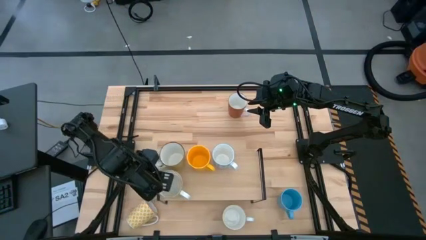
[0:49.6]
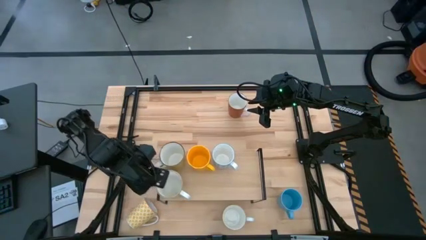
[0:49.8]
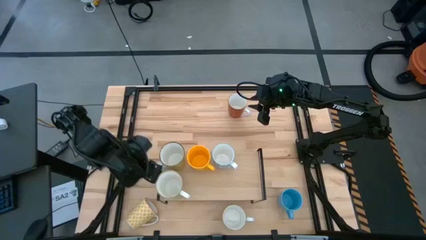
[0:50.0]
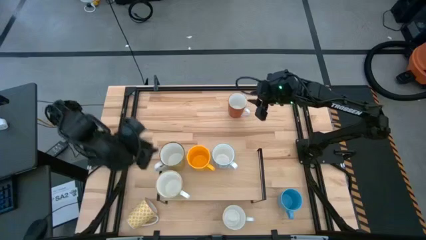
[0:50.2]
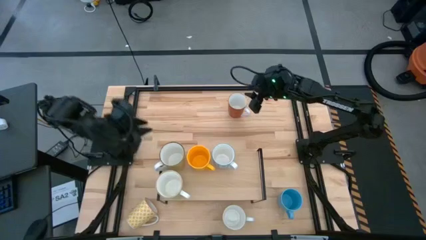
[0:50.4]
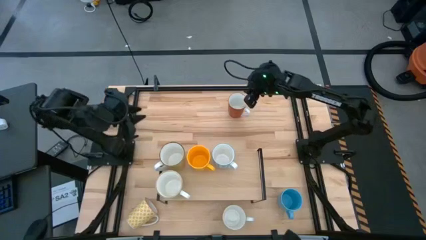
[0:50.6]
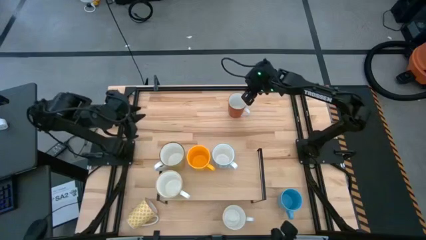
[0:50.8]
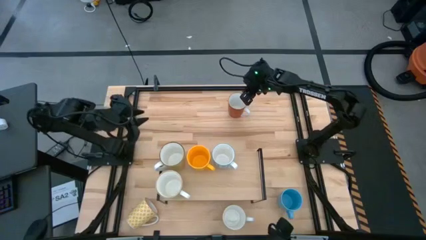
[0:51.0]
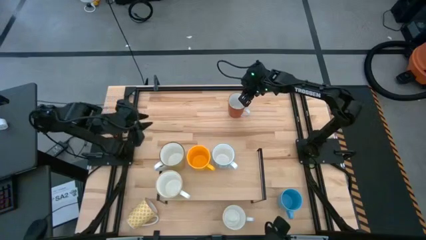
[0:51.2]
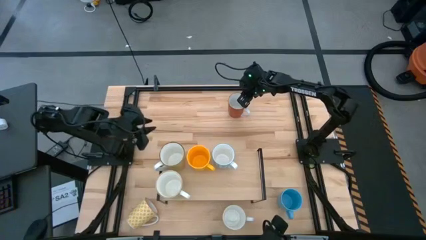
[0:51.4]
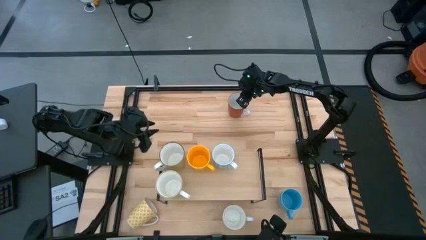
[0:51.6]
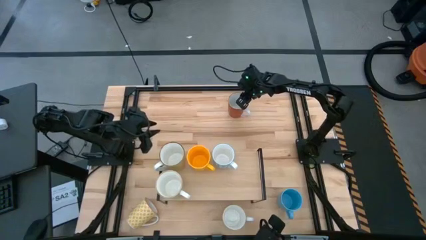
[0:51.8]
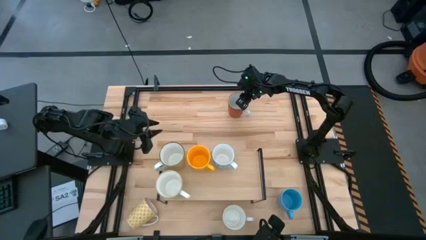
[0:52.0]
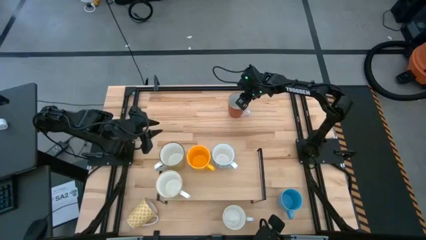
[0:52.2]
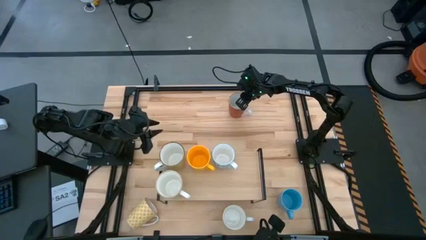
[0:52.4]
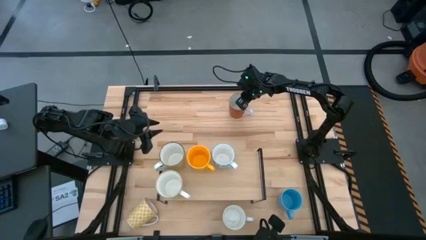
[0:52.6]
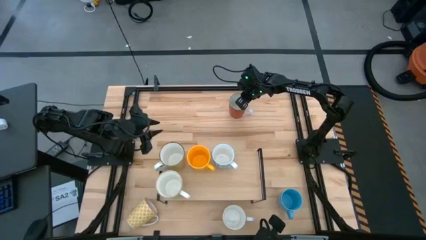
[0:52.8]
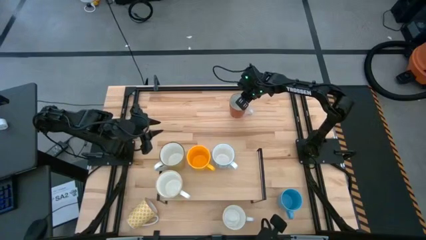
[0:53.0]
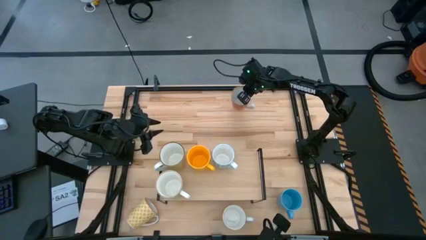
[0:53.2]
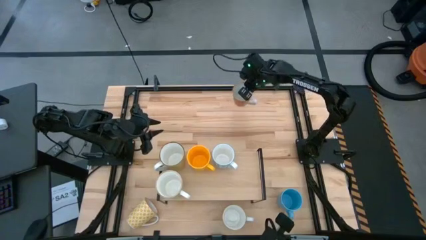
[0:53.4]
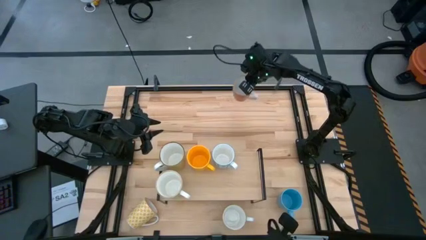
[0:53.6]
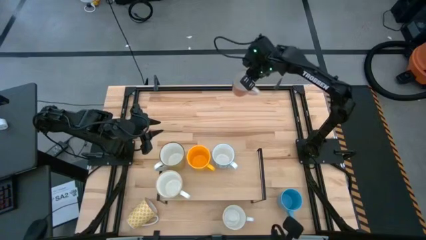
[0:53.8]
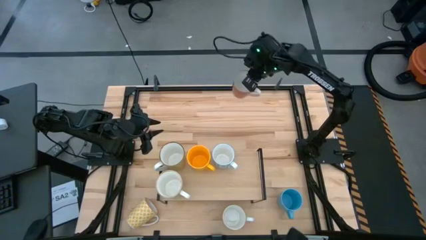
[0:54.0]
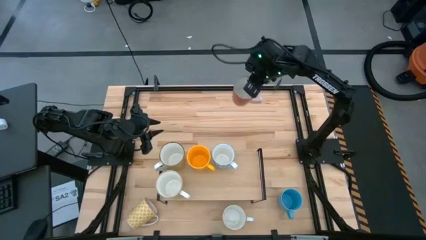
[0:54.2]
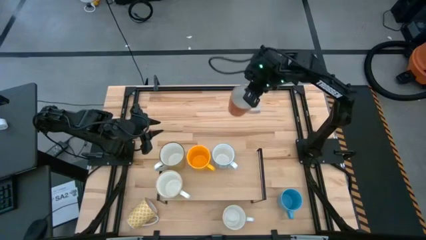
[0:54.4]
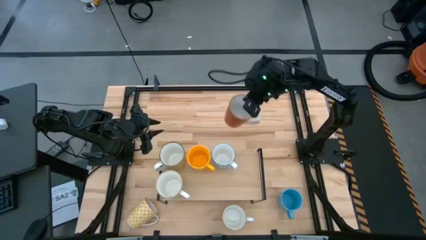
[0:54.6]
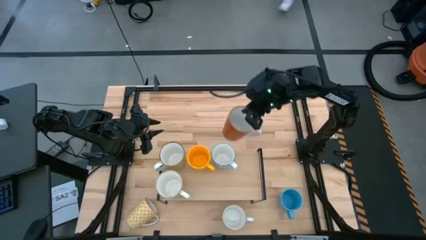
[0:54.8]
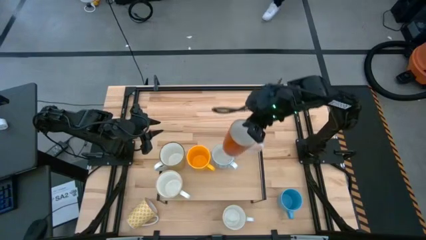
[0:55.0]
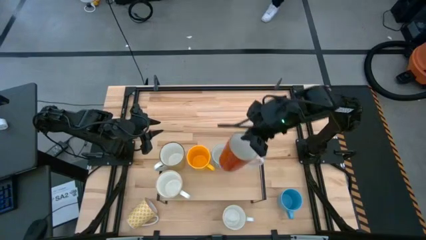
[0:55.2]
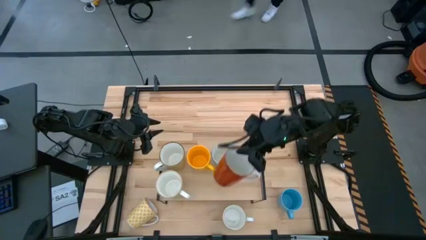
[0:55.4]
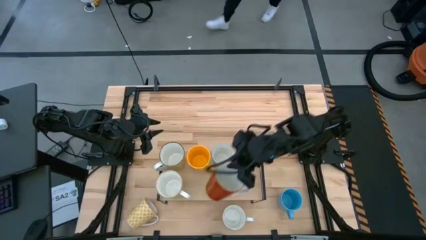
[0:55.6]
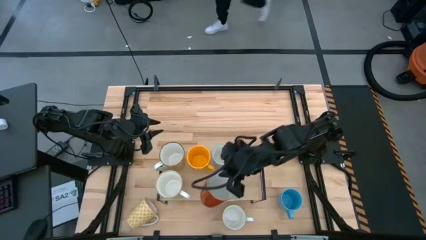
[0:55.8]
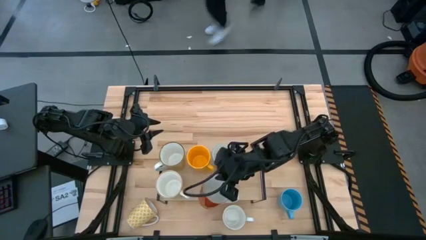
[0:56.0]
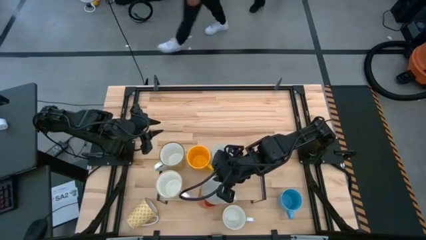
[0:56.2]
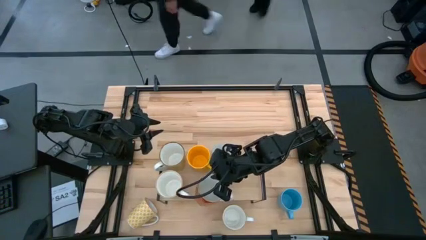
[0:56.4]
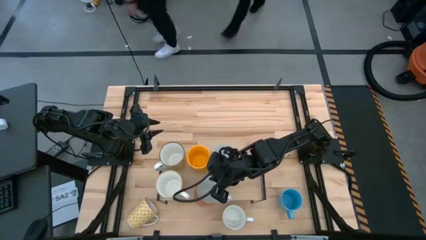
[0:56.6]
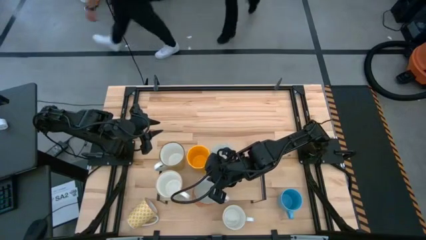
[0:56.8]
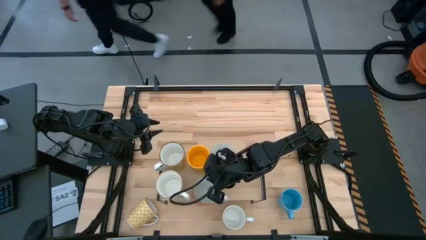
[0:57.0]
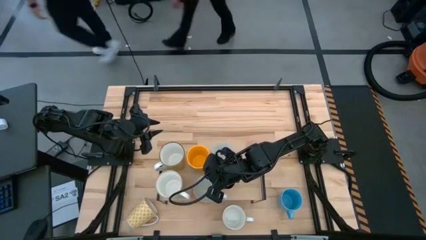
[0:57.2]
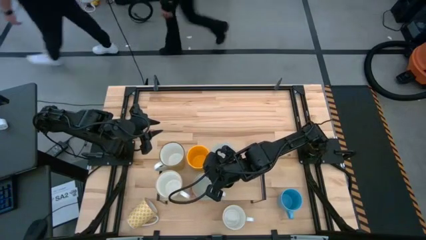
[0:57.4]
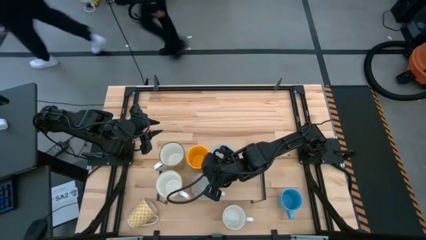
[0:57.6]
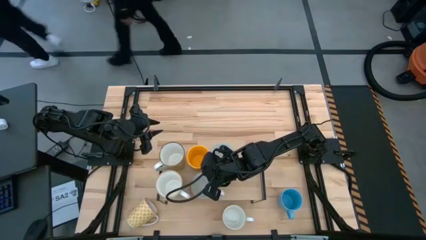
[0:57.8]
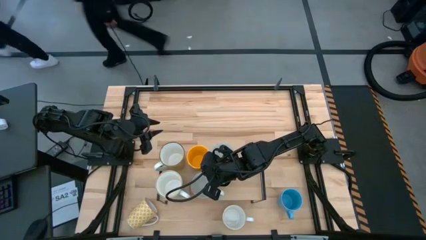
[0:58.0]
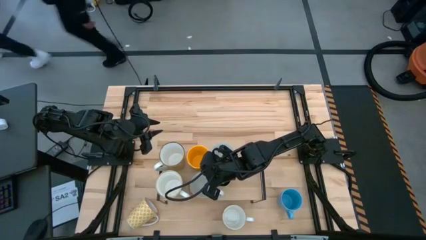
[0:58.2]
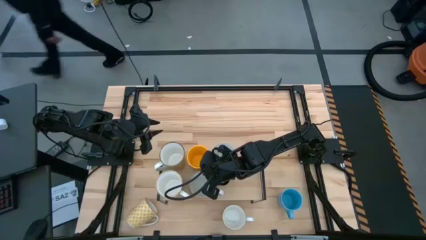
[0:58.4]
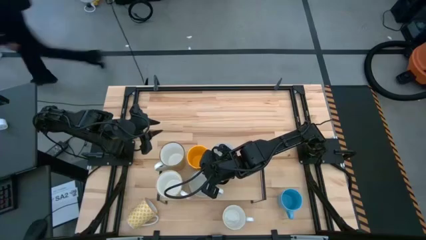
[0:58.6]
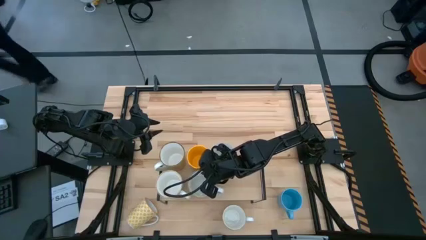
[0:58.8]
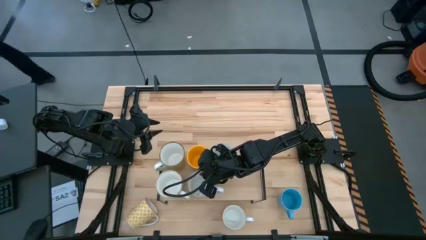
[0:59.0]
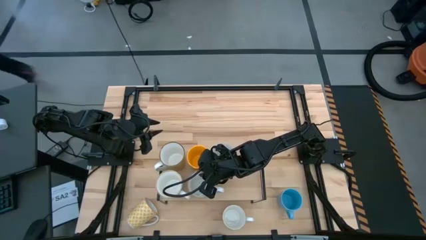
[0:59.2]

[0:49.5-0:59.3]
Task: Place coffee mugs
Put the red mug on the shelf

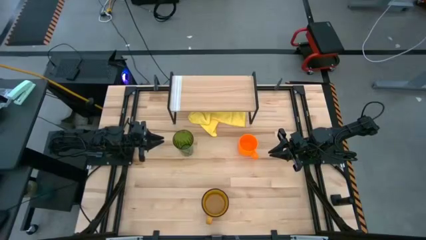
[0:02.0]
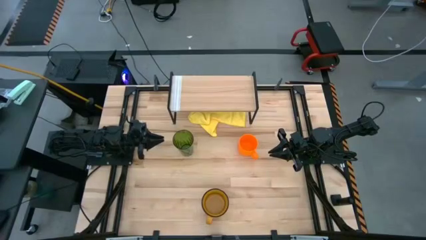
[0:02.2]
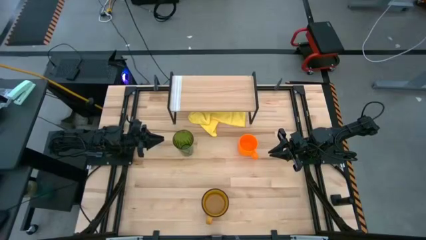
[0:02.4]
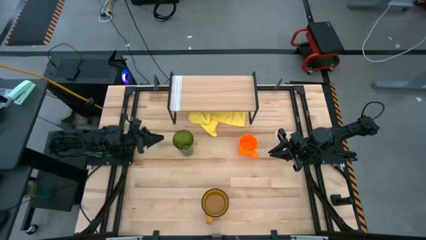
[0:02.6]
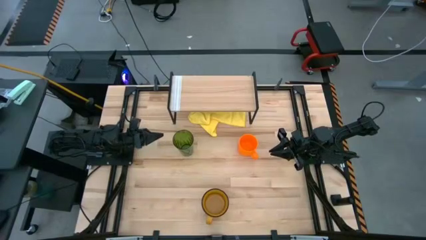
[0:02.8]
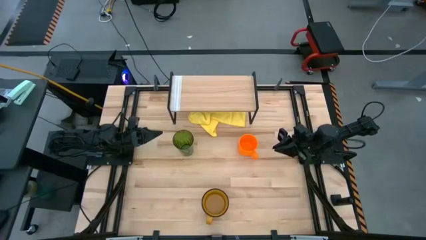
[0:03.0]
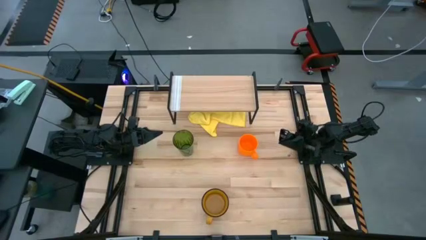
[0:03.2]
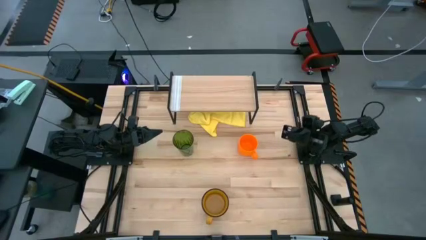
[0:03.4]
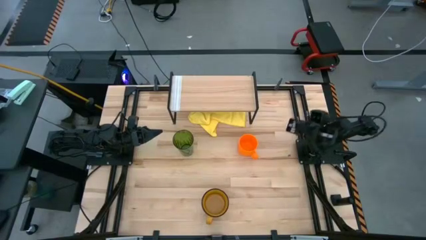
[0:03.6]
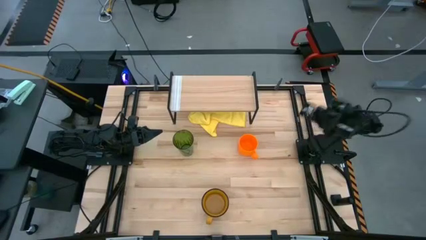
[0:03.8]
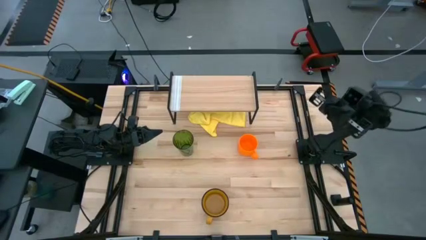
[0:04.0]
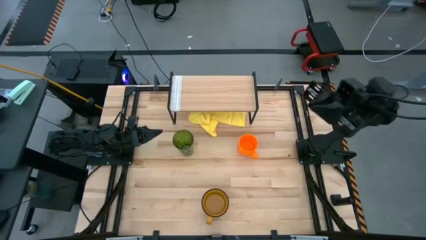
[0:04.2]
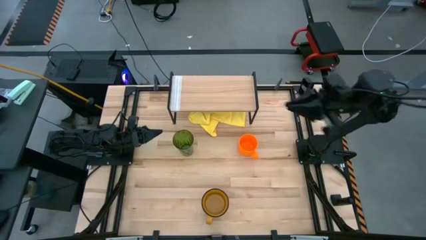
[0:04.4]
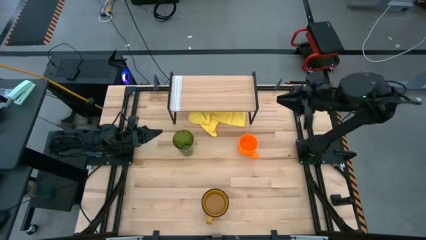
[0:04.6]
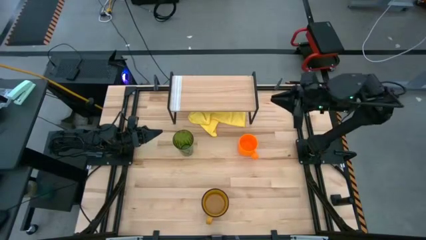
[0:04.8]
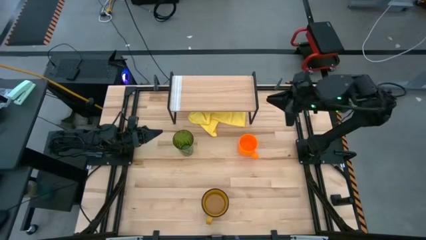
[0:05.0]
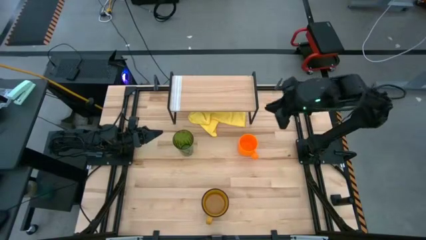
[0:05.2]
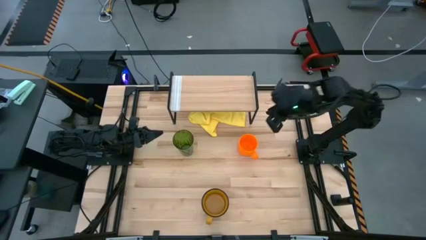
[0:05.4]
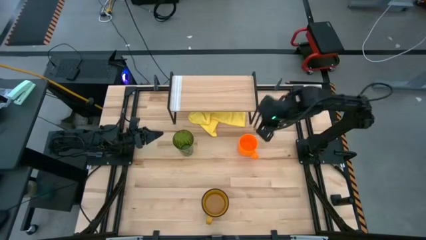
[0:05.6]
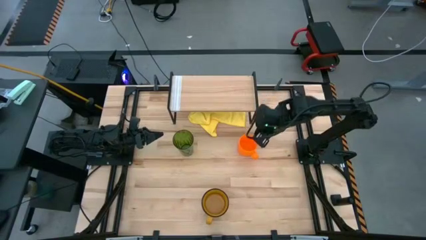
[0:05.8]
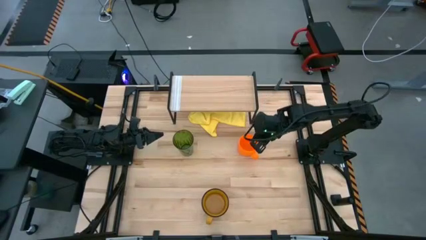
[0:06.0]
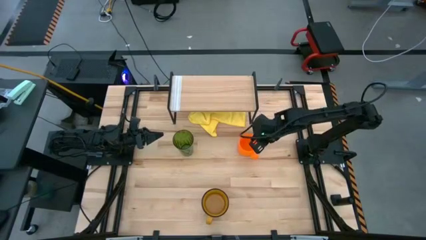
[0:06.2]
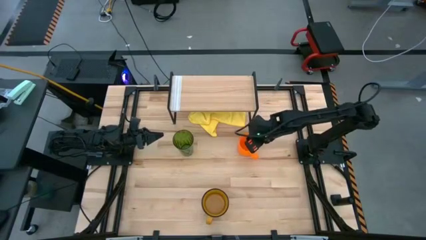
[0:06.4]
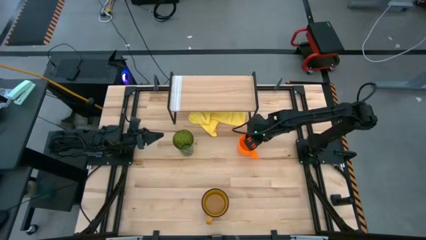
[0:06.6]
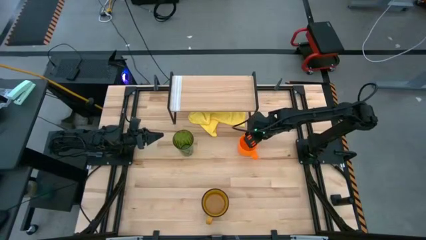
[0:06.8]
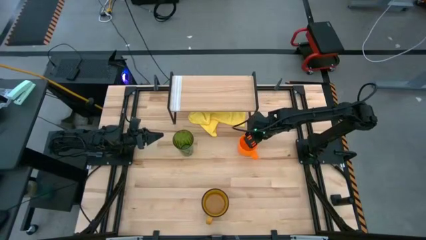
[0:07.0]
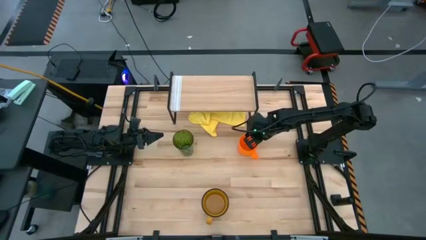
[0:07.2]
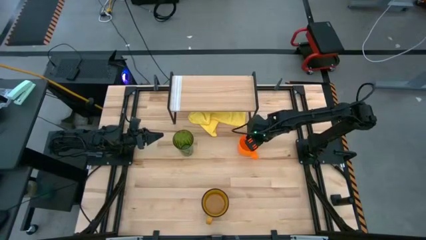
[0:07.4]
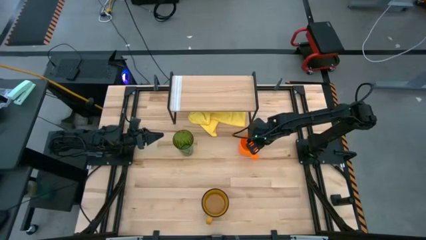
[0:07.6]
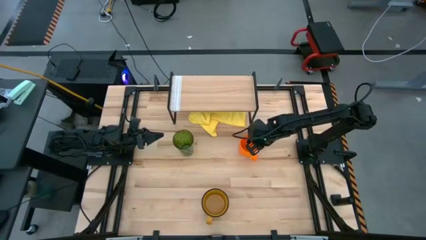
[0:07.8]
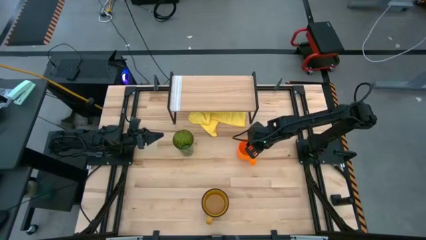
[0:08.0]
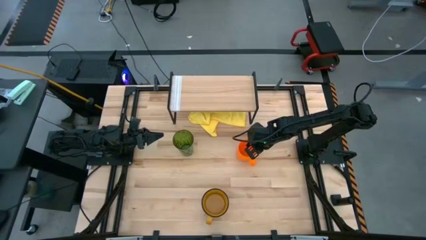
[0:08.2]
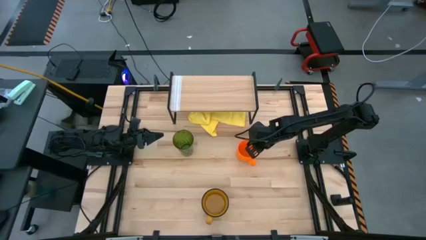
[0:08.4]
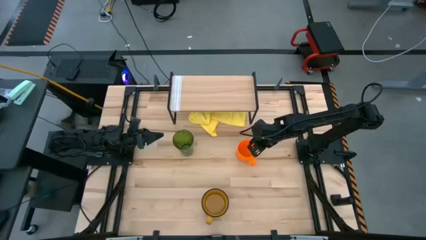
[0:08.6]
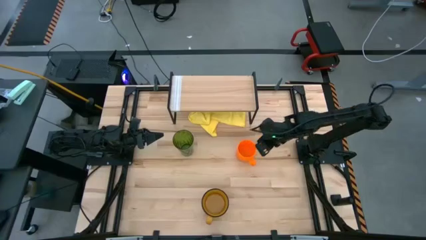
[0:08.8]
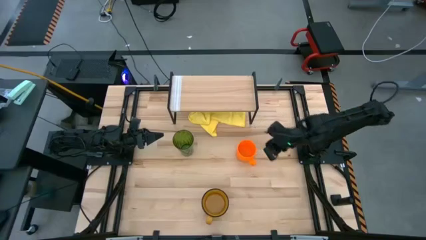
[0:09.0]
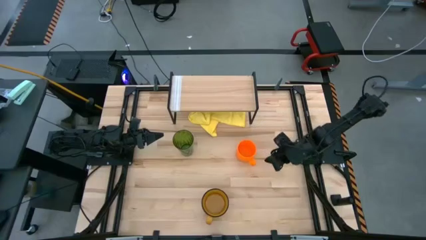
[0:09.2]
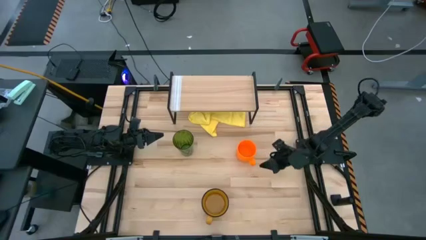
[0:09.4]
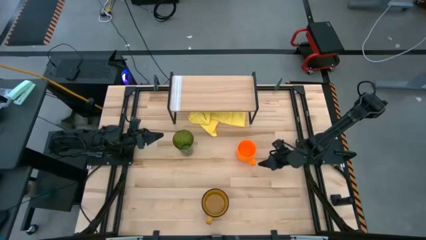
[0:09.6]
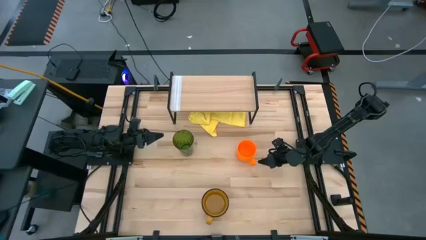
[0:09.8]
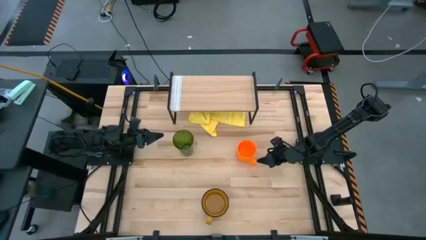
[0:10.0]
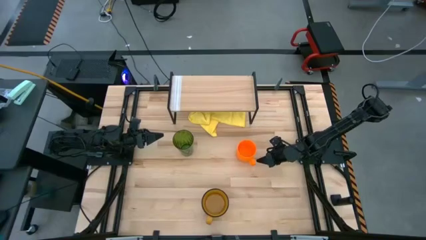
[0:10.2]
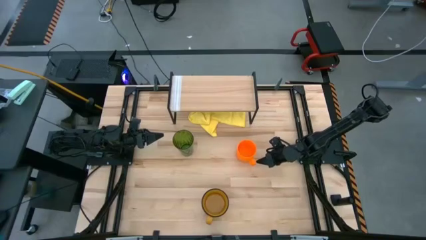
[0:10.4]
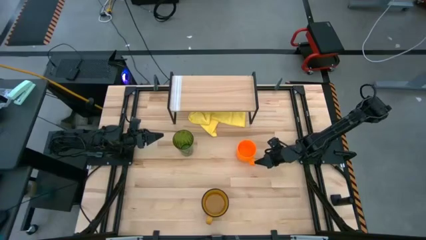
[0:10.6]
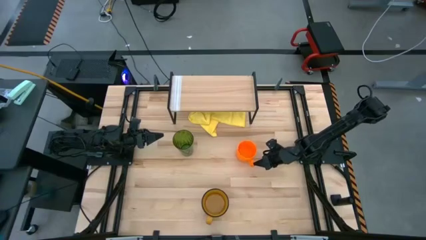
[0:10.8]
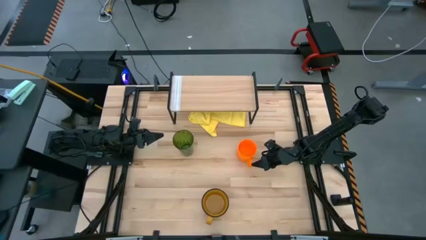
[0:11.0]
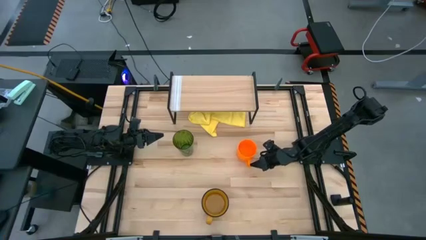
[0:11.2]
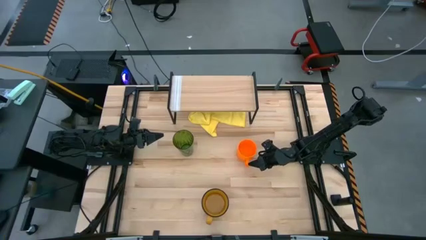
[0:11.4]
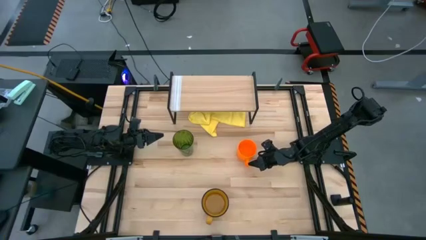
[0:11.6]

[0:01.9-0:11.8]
Task: Stack small to large cups/mugs on shelf
Put the orange mug on the shelf
